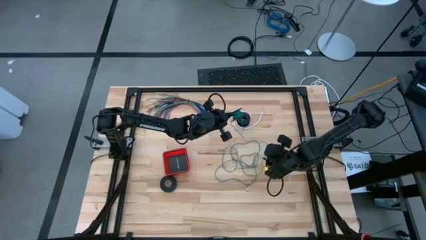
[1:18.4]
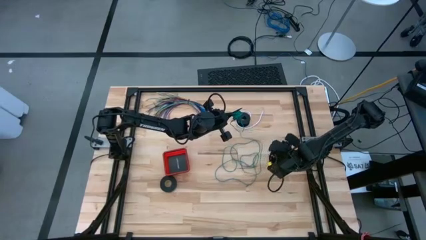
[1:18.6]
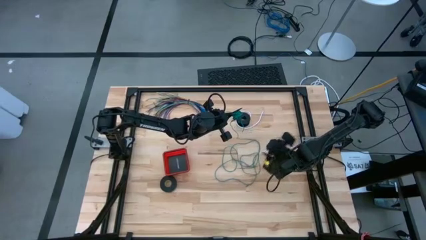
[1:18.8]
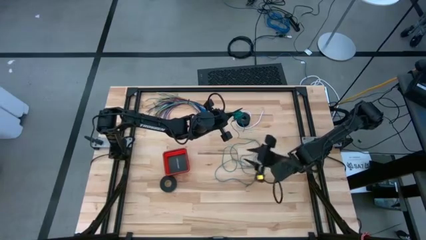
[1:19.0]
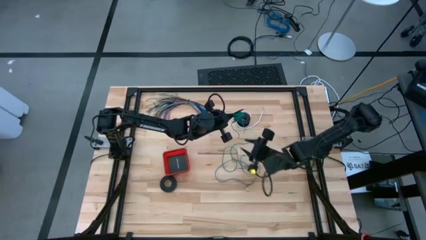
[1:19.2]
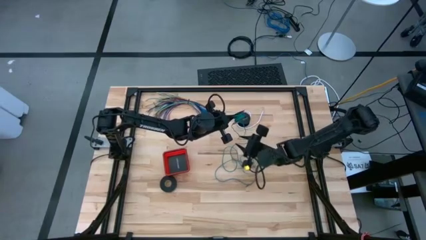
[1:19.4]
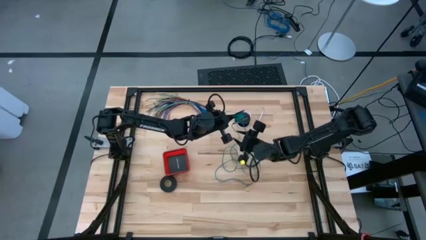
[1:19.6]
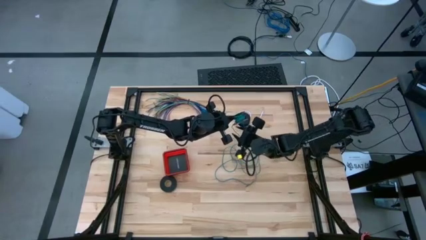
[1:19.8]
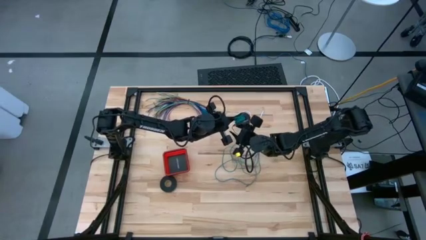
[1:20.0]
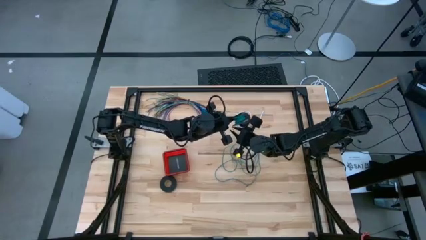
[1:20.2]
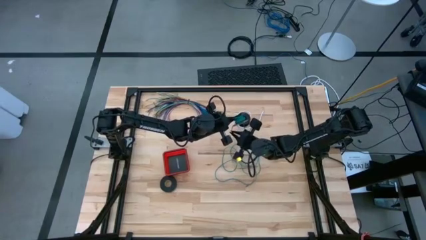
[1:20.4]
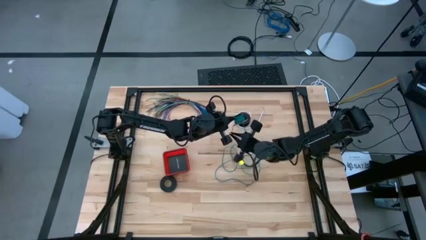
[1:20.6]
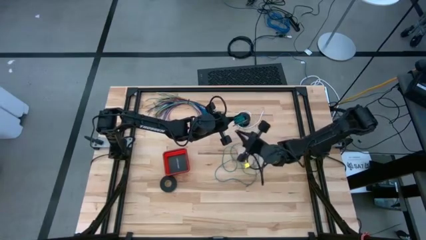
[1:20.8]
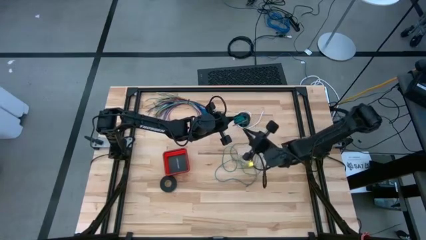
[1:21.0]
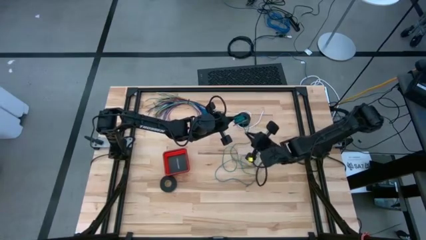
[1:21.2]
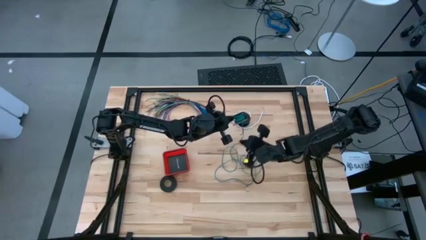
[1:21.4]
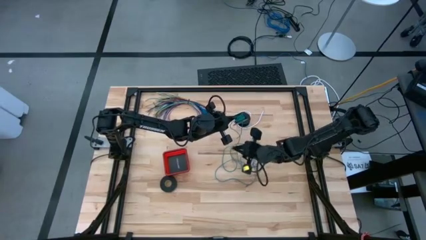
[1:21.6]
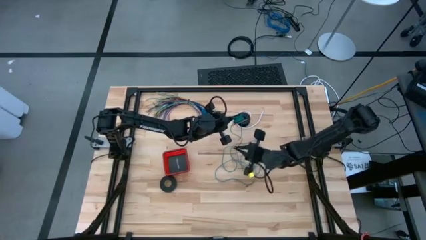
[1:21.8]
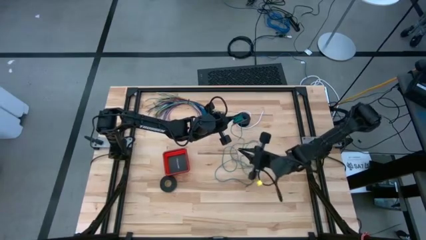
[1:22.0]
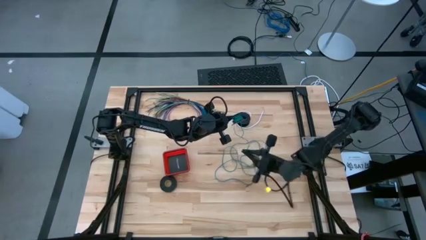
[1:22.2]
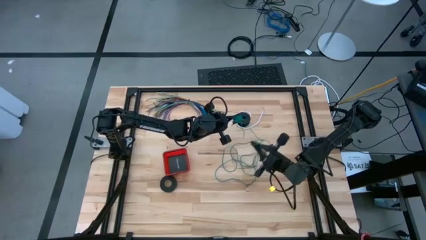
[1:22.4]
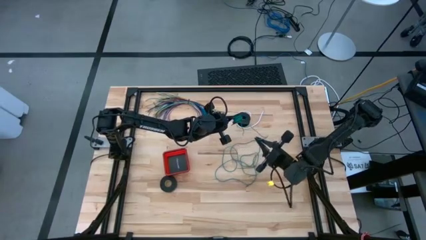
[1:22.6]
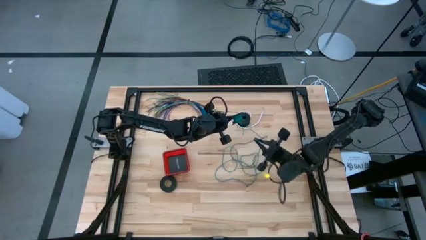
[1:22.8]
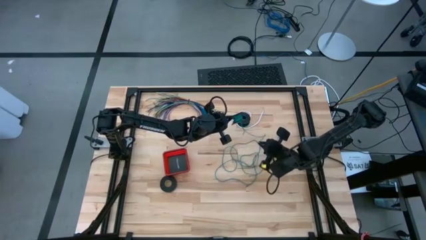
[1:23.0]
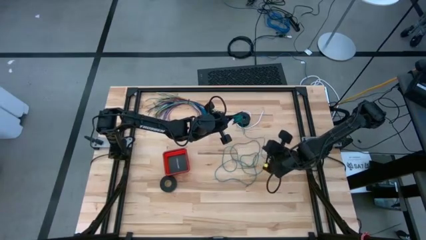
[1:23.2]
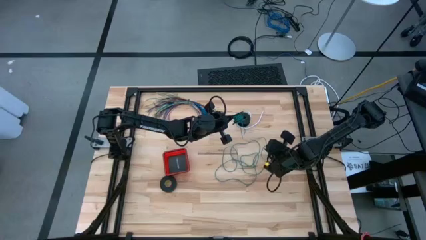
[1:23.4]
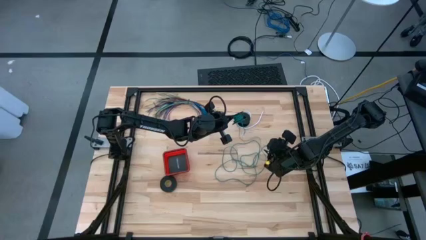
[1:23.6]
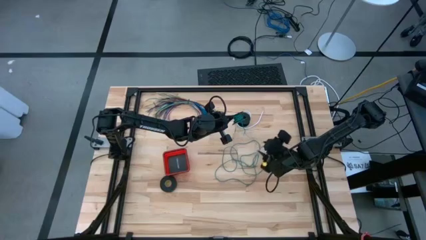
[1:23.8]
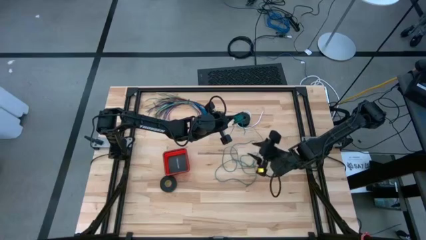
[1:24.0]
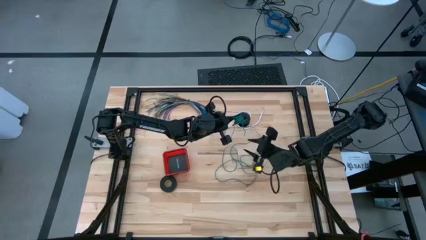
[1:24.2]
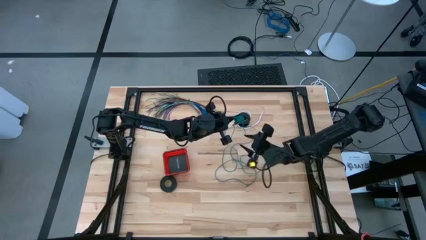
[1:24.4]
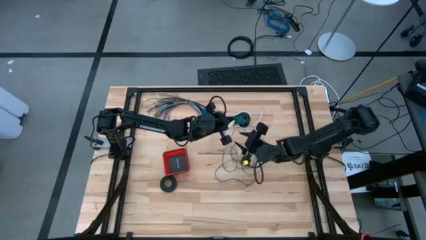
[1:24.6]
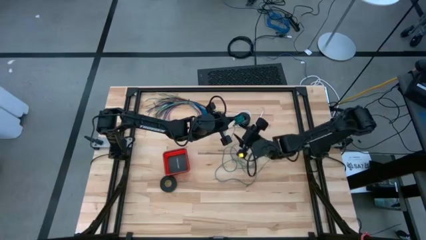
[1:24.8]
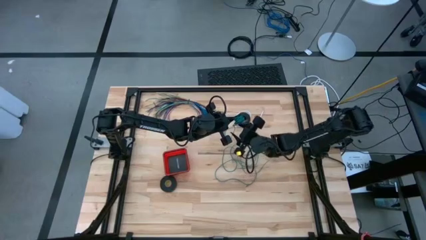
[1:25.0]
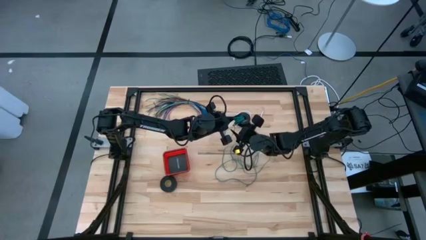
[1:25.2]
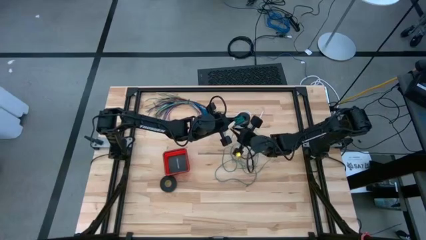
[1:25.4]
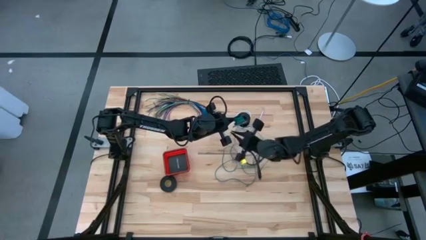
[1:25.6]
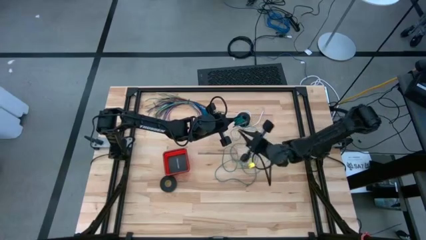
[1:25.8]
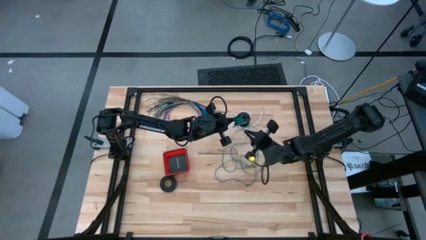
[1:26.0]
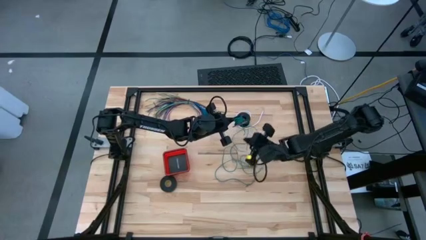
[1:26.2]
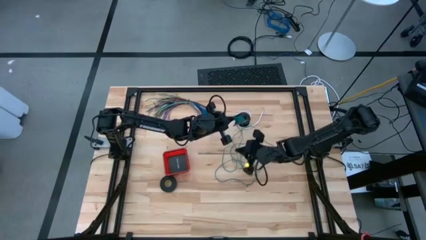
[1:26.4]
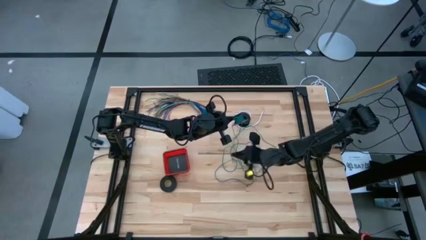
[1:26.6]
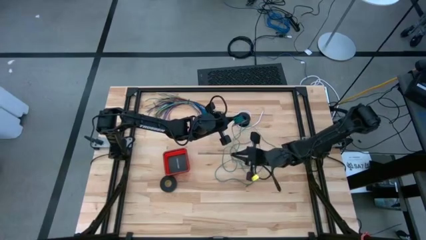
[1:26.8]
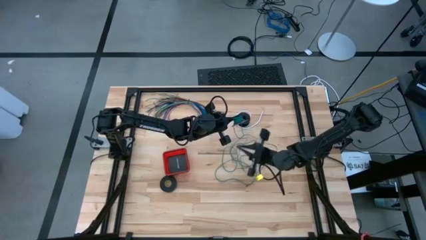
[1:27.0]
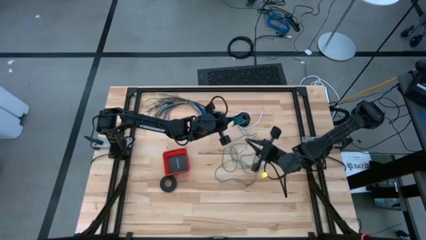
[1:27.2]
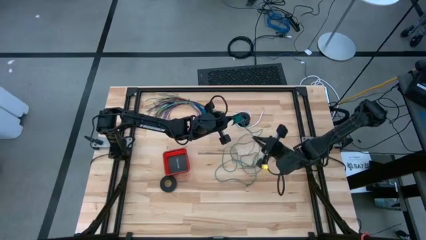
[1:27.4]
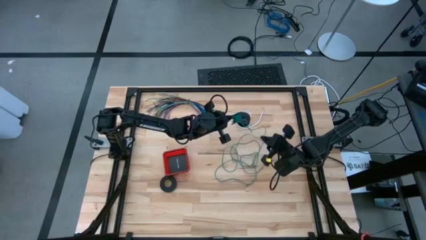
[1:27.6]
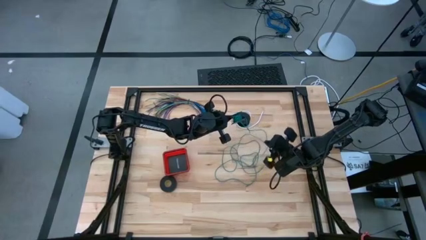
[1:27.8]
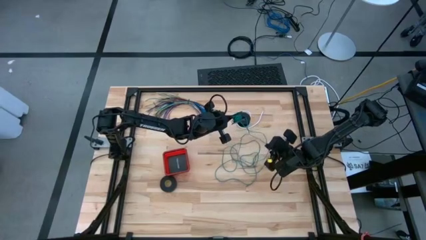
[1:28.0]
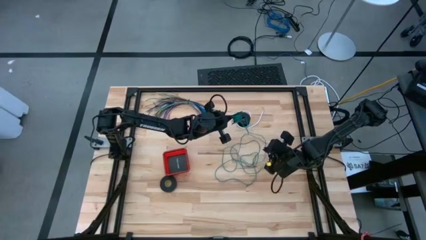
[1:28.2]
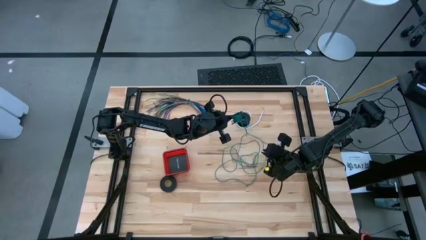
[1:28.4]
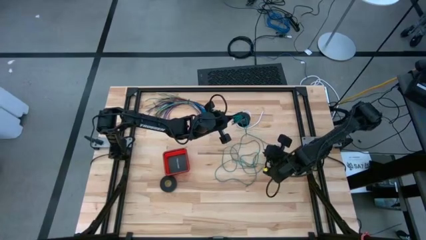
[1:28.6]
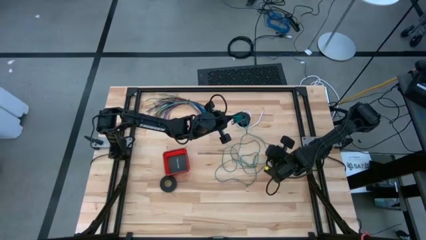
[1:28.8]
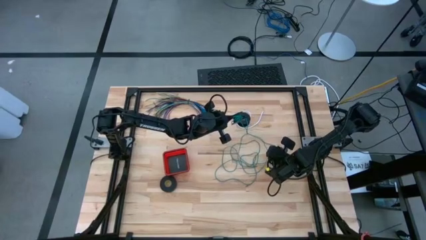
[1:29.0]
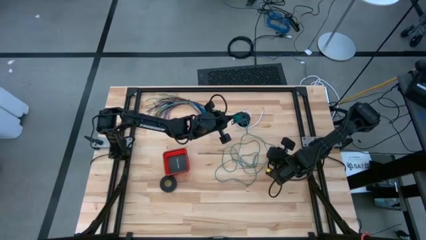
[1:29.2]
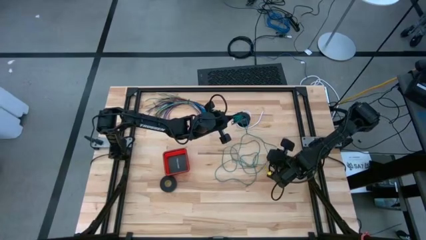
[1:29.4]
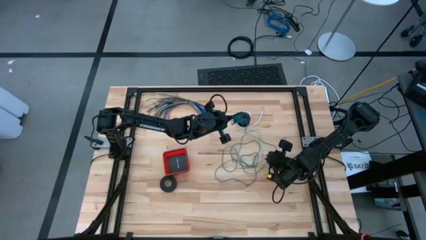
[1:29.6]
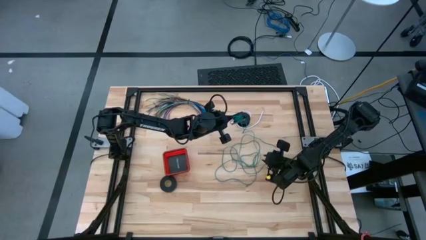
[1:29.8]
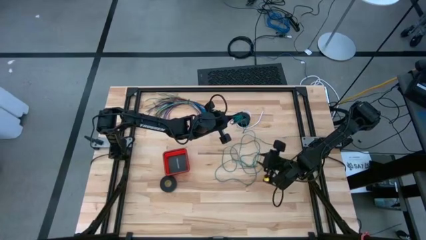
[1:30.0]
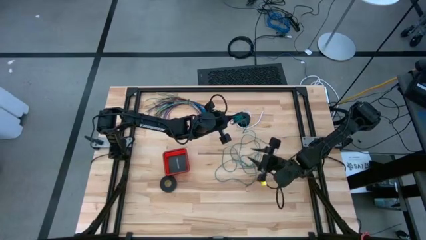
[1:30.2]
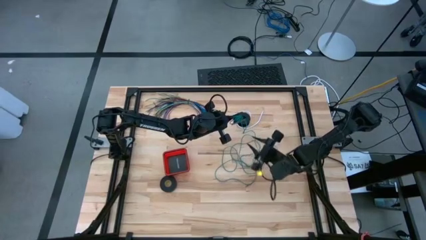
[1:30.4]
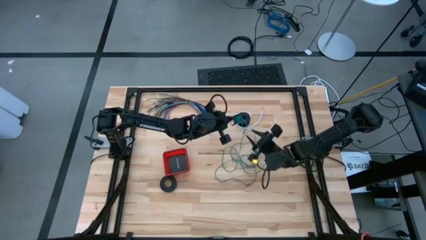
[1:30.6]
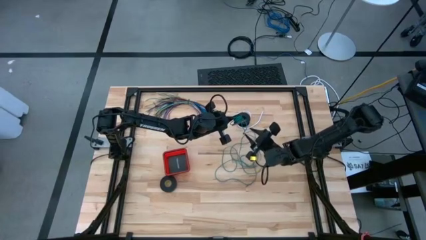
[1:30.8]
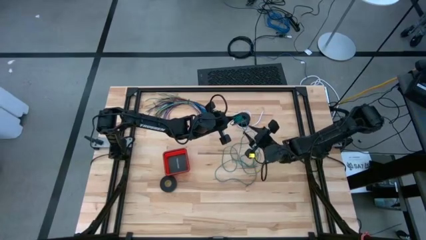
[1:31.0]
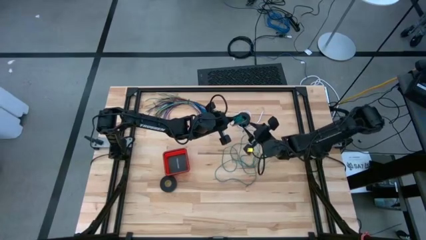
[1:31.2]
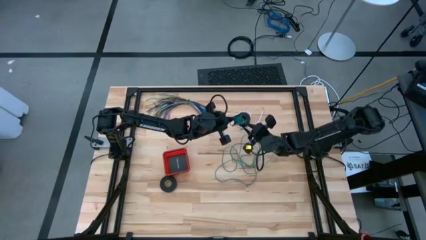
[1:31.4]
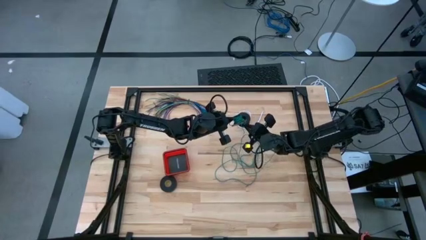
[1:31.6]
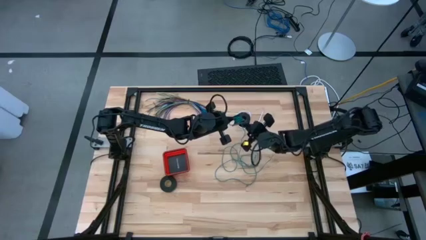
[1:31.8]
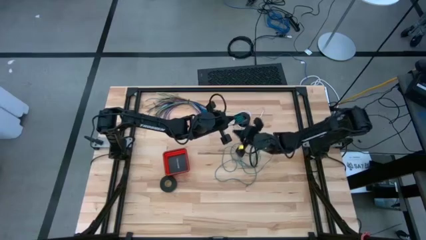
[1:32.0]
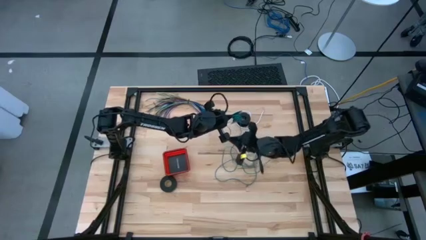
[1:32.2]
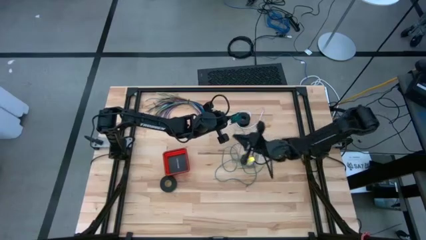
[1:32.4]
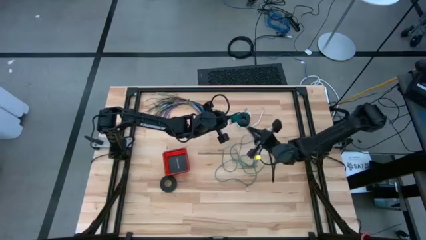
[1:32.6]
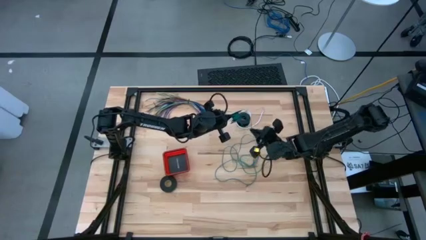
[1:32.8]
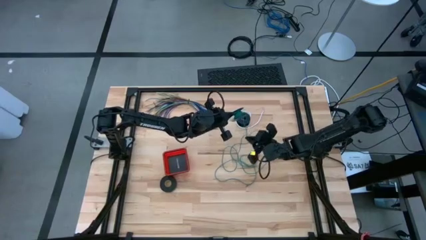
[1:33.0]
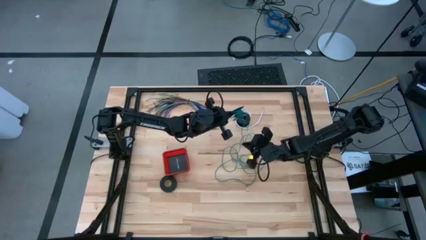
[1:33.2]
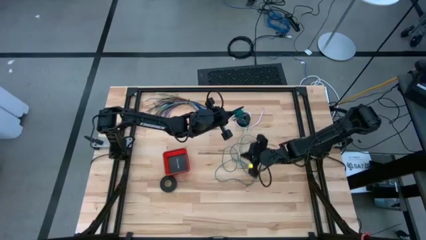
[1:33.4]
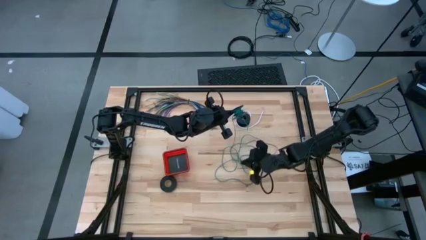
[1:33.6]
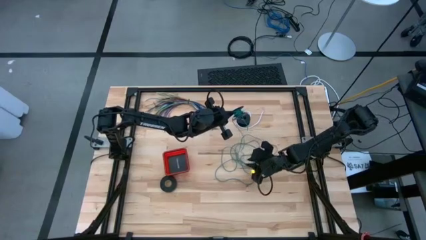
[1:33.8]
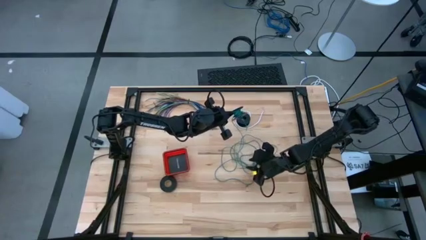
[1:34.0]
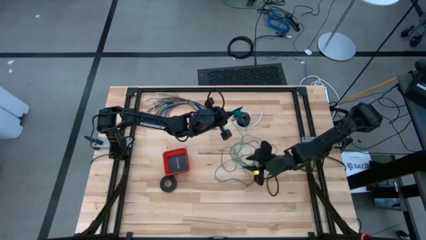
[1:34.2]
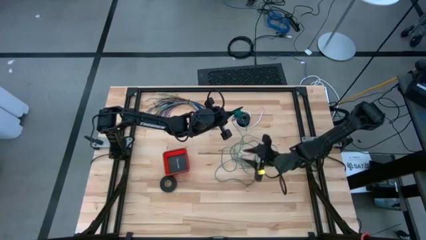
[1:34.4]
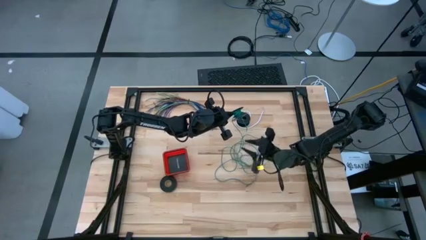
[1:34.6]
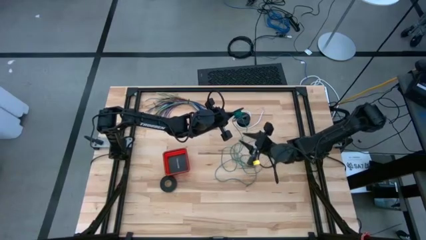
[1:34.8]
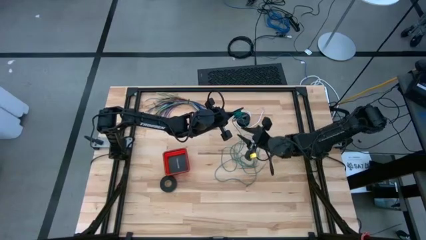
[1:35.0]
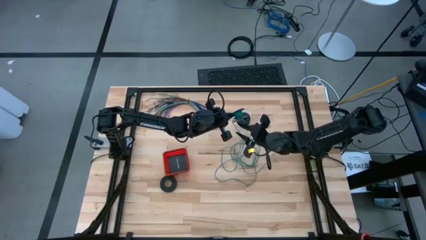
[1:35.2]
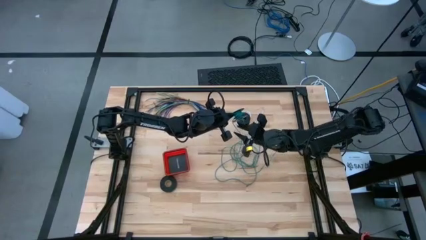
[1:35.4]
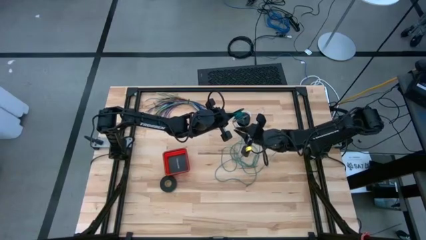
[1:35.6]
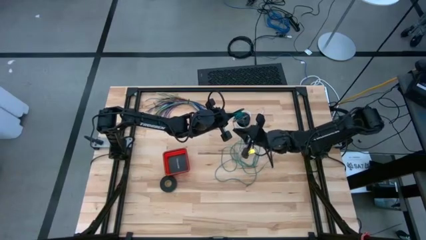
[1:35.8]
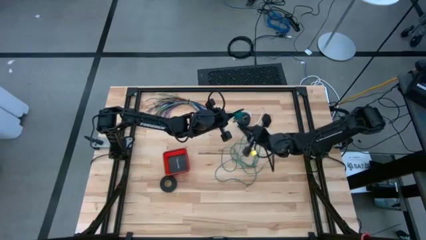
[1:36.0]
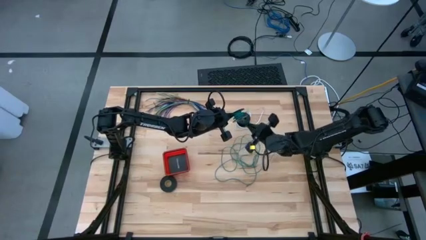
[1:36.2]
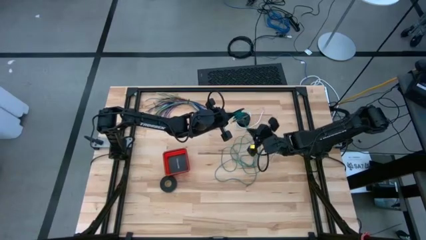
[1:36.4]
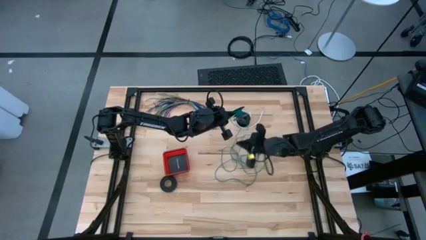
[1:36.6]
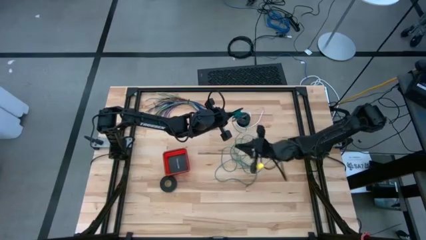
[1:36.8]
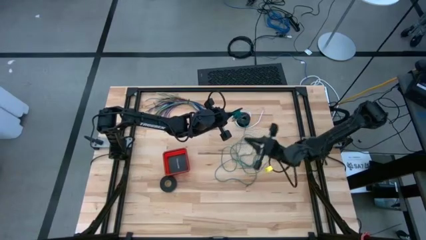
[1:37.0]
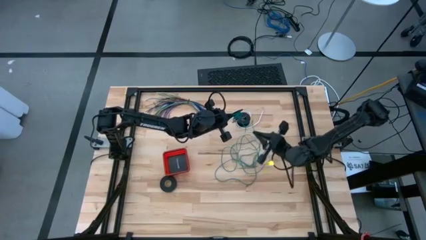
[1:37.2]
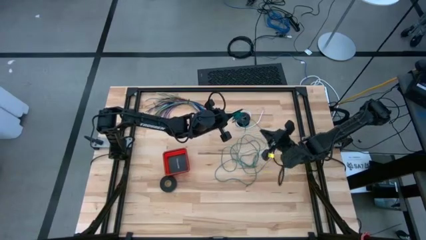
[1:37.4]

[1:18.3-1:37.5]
Task: Coil cords
Uncoil the green wire from the spool
